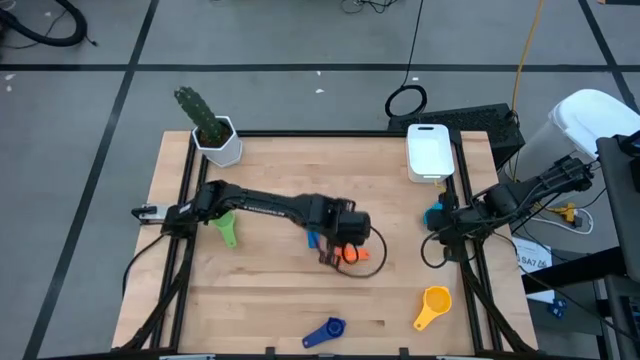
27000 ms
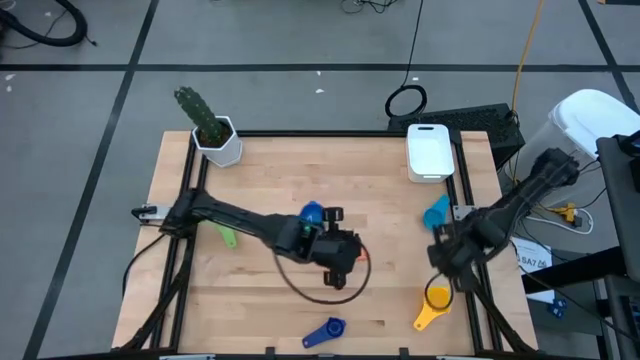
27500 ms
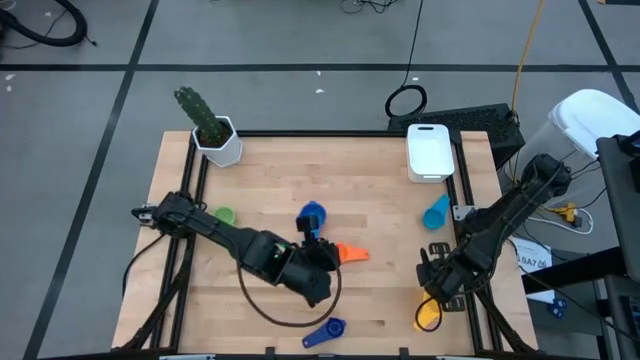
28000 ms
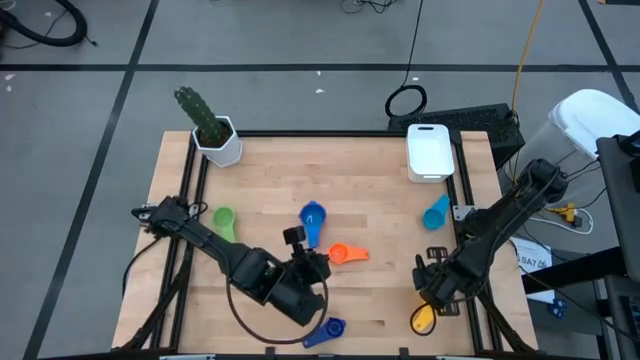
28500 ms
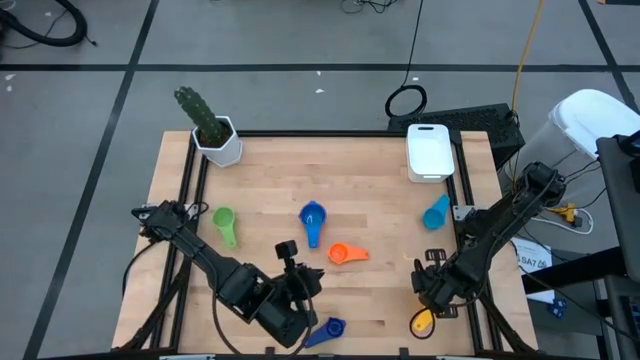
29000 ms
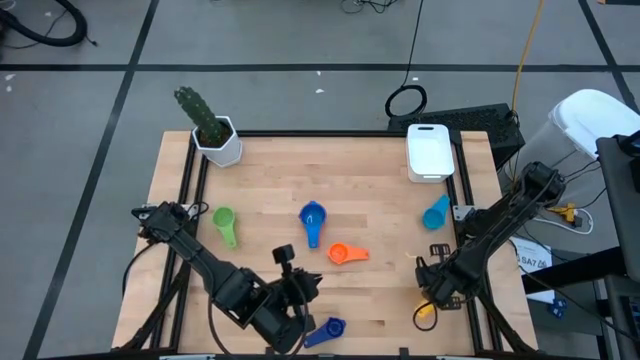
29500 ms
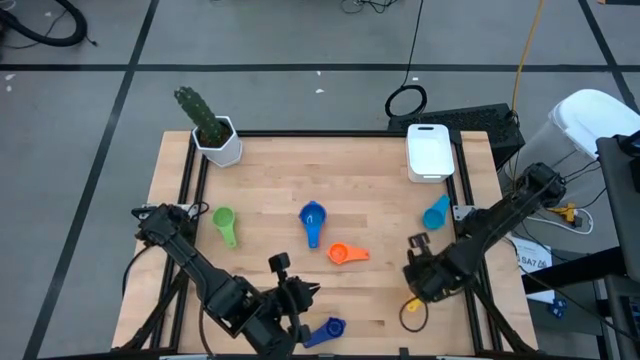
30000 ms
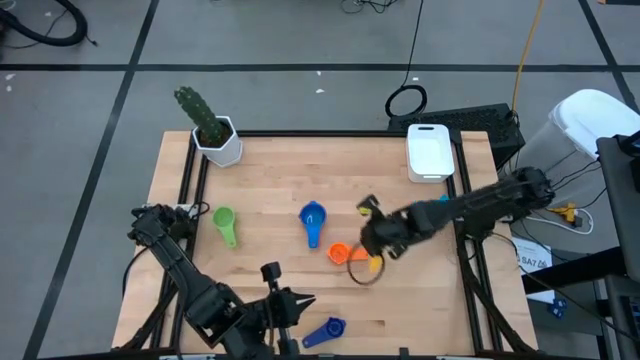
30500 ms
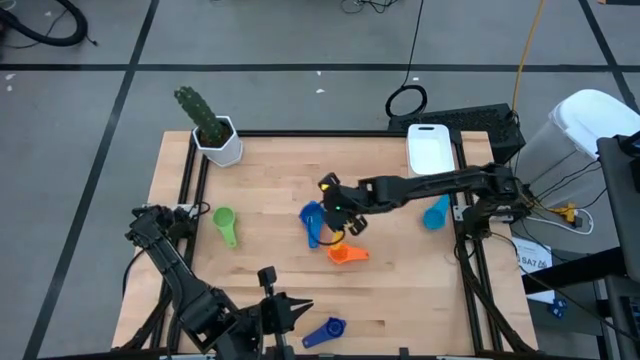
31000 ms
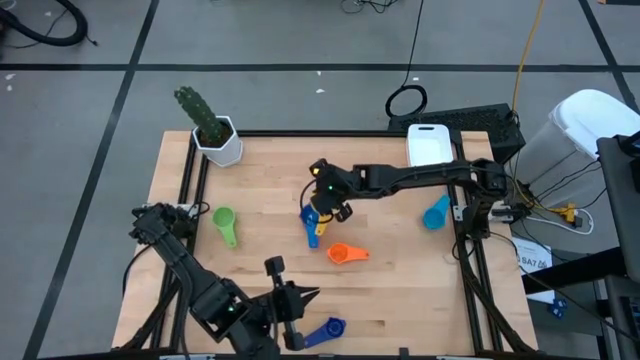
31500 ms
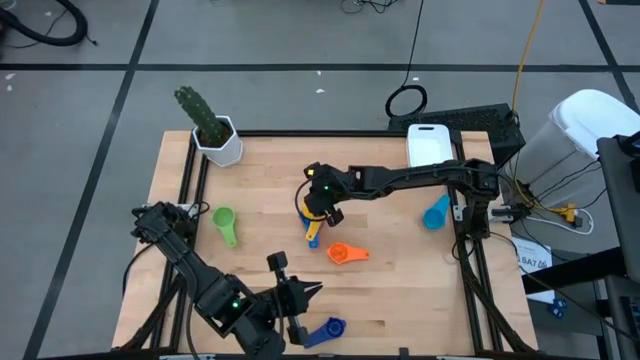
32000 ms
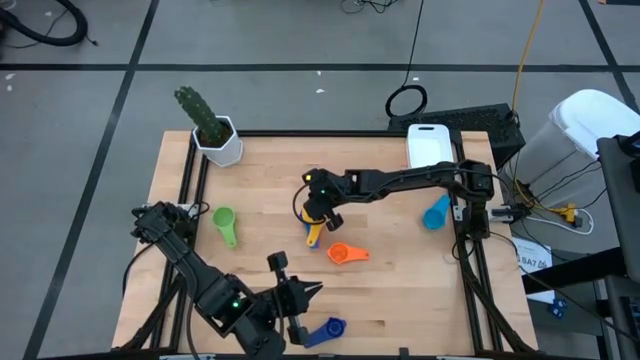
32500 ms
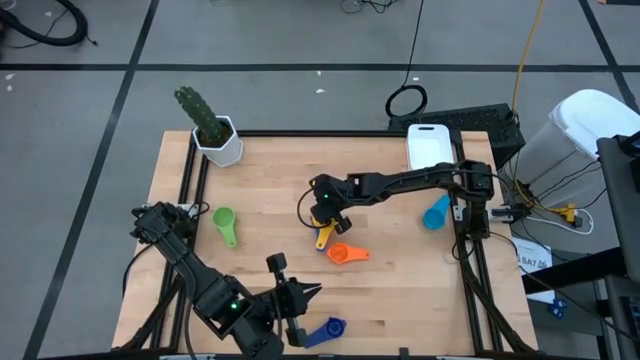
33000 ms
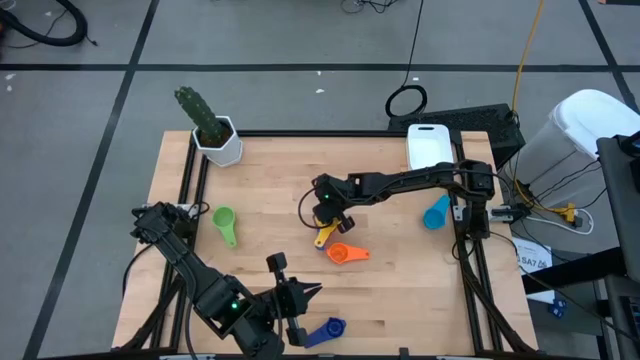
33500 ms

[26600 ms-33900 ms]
Task: Nest measuring cups in basket
Stack the yellow measuring cup on top of the blue measuring cup

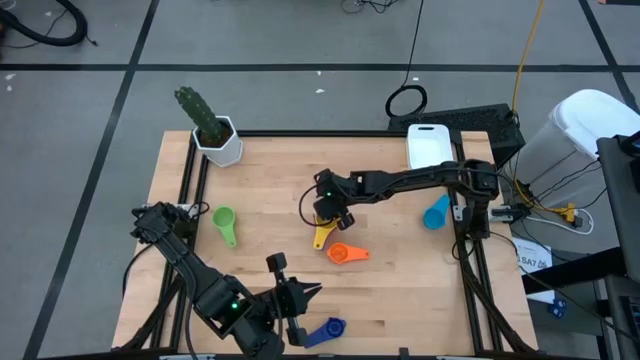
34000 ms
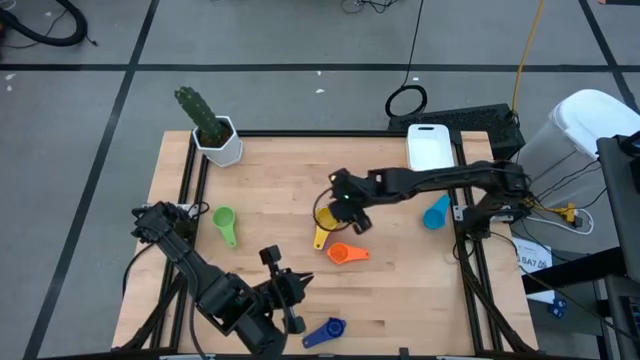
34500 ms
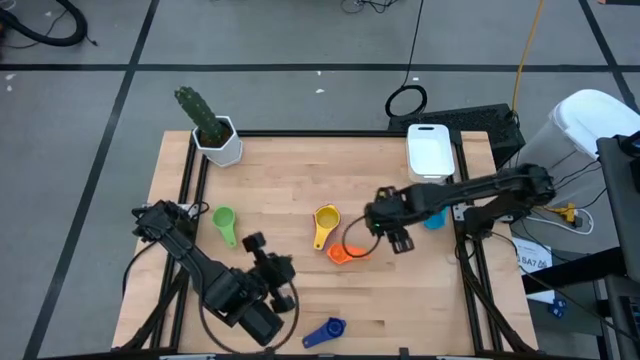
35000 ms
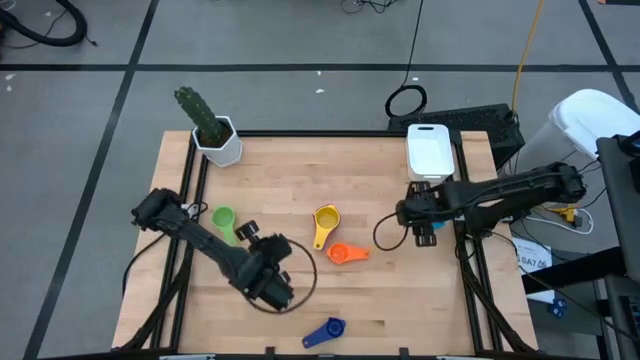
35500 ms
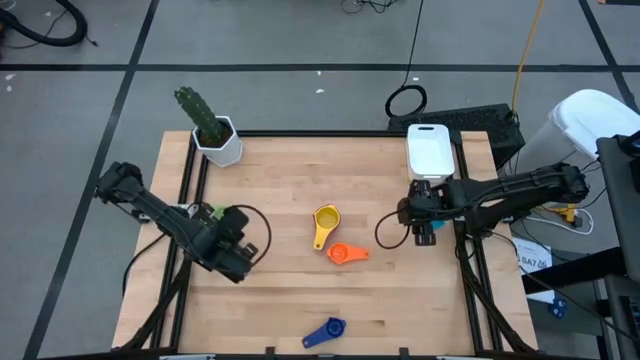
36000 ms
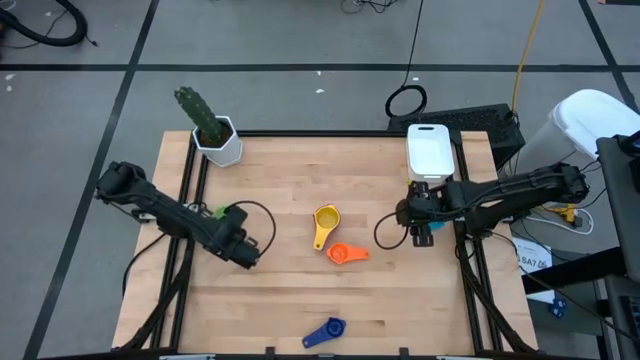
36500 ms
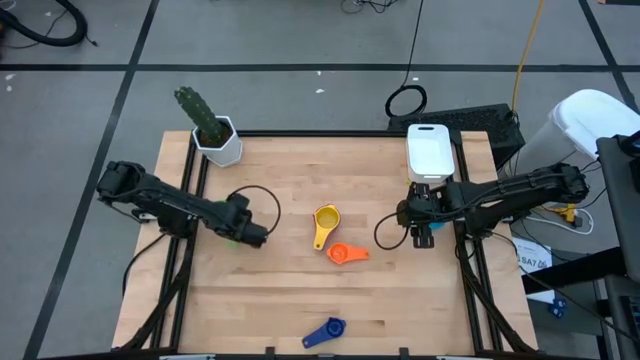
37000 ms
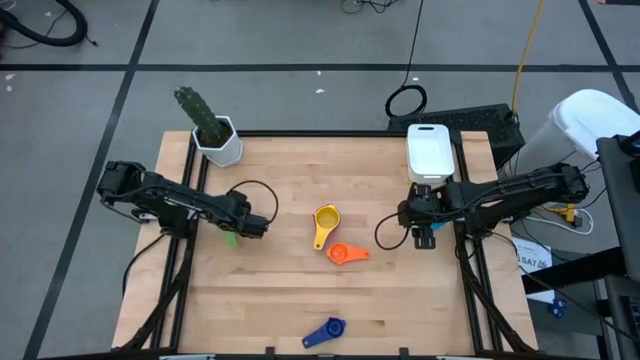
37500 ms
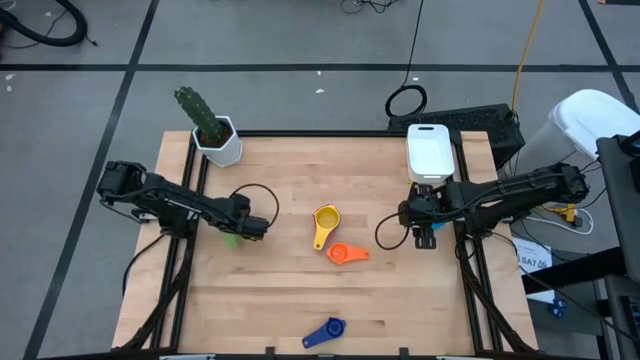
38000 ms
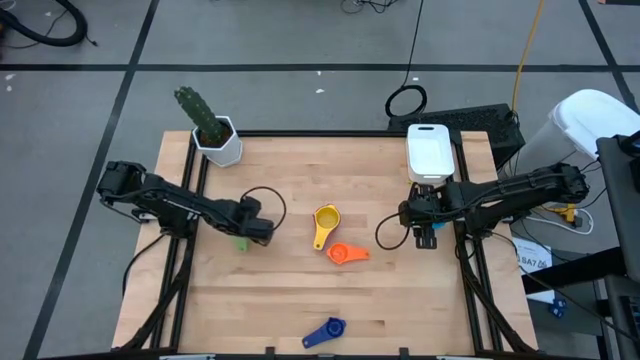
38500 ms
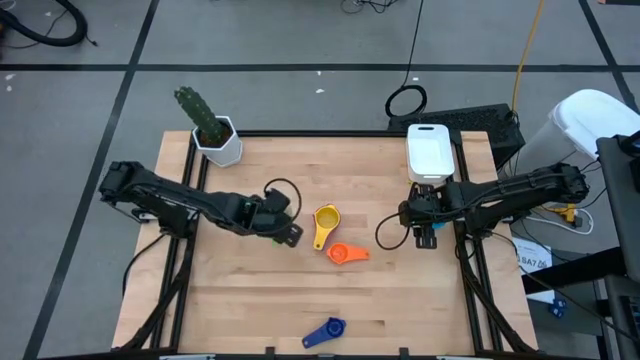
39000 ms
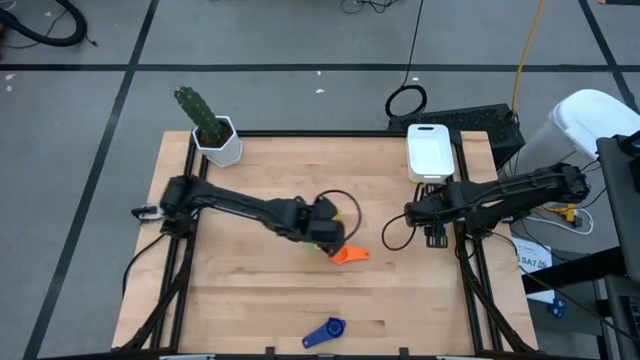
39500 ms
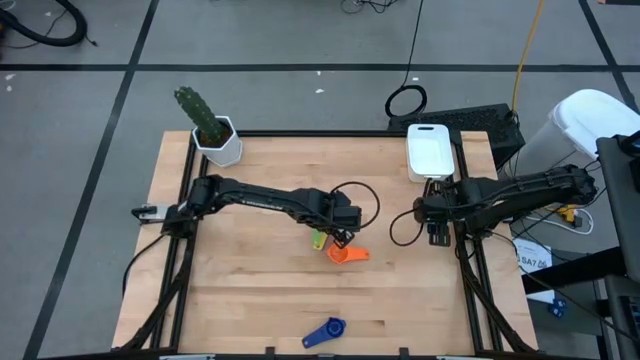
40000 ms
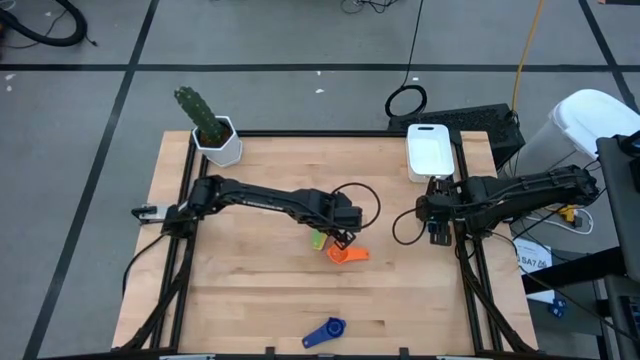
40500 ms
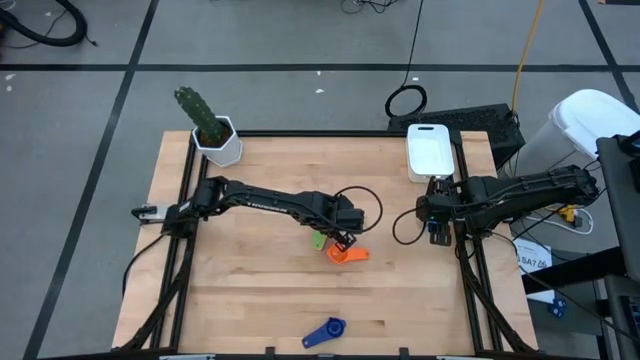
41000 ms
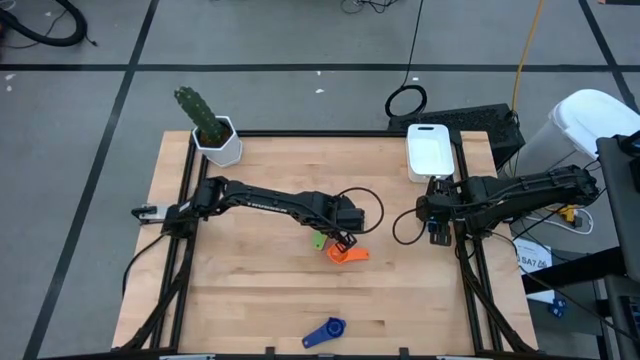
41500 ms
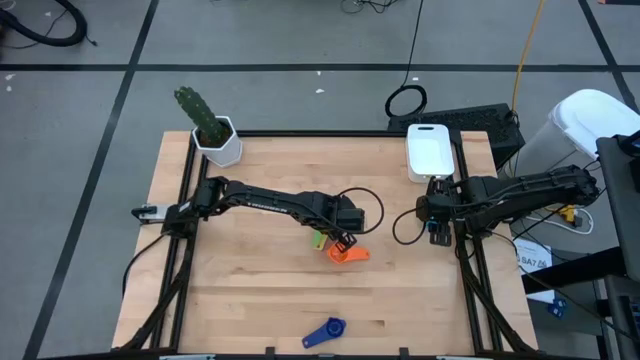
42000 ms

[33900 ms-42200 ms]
Stack the green measuring cup on top of the yellow measuring cup

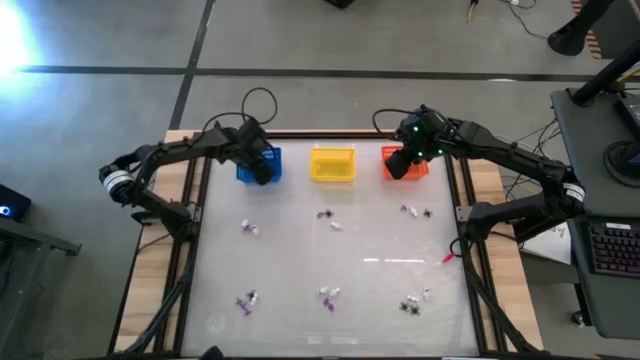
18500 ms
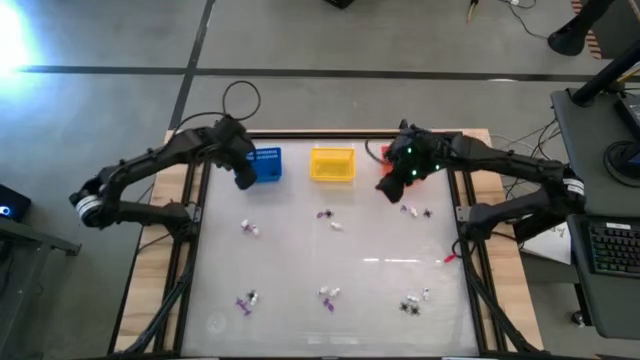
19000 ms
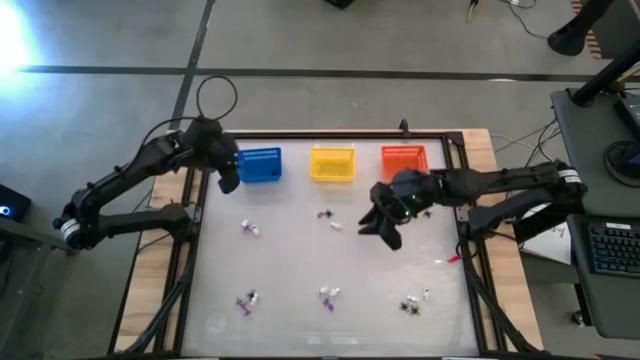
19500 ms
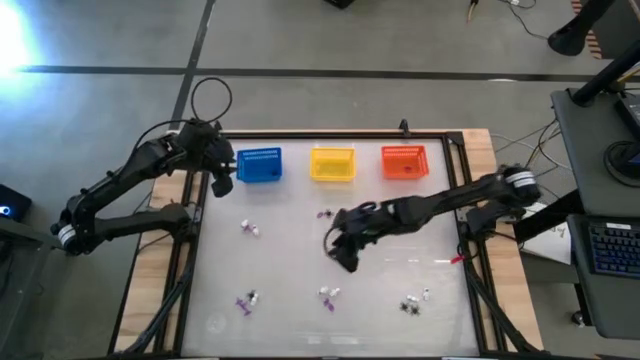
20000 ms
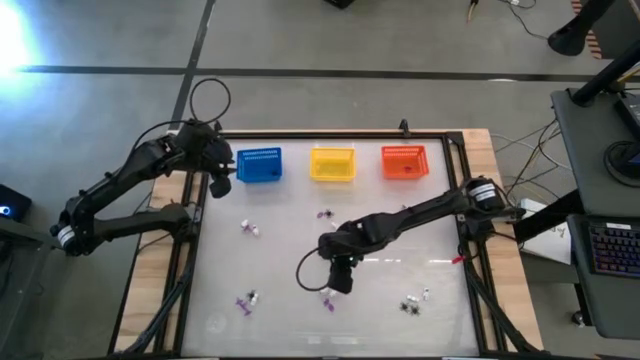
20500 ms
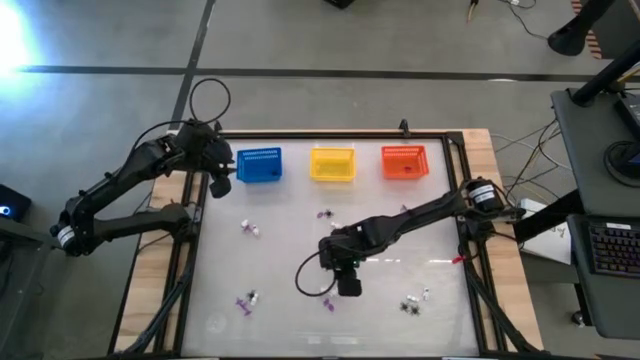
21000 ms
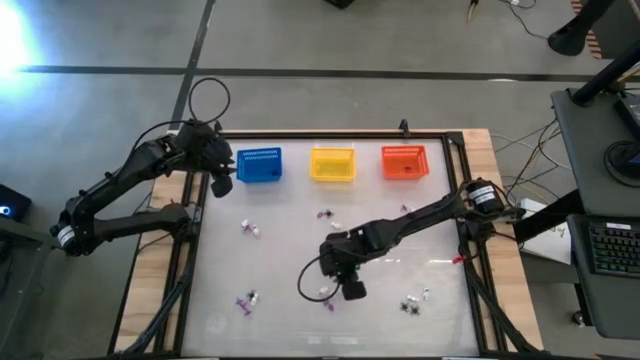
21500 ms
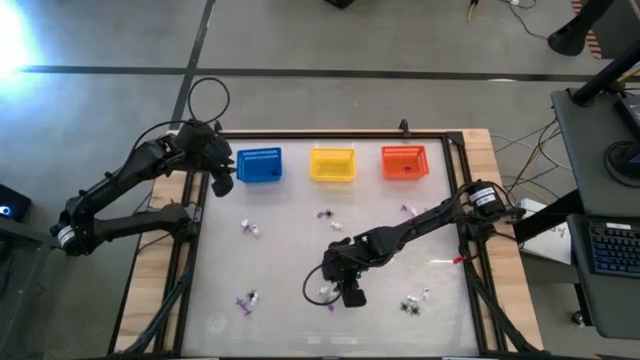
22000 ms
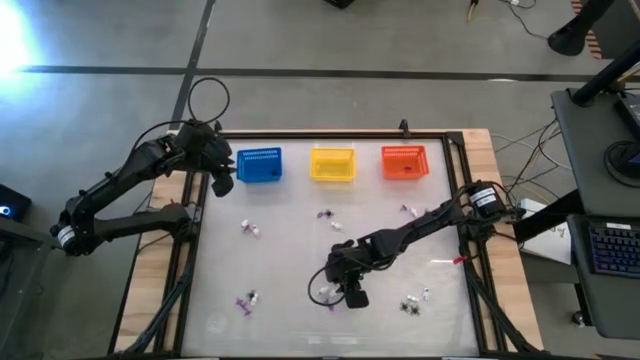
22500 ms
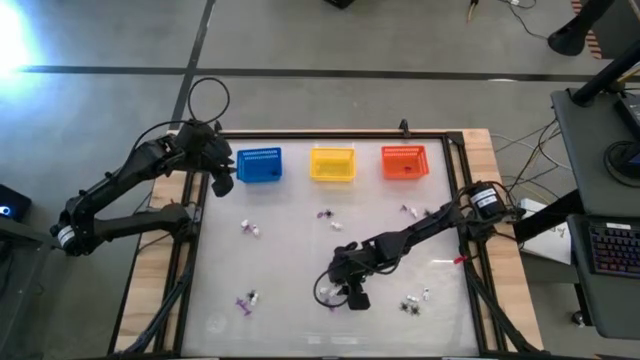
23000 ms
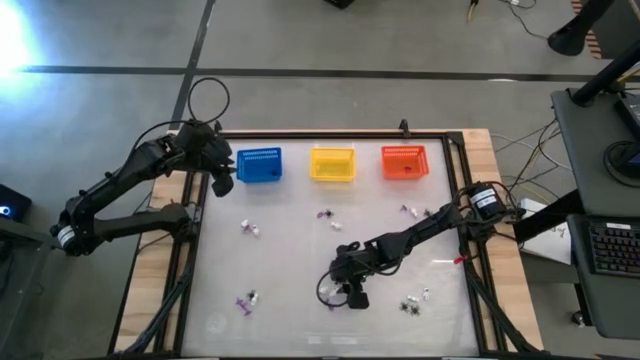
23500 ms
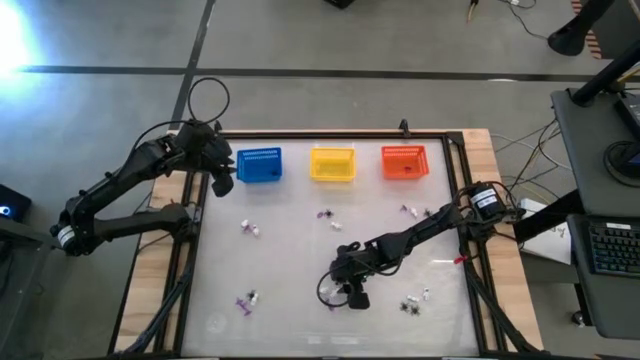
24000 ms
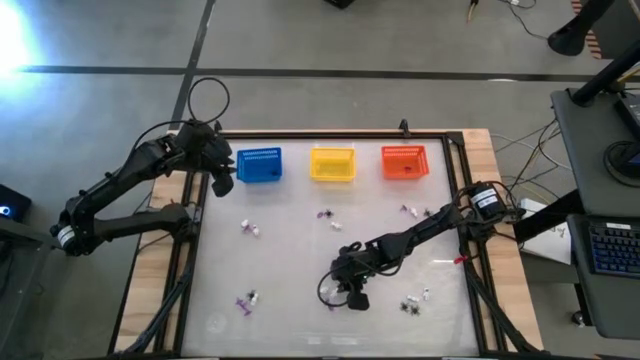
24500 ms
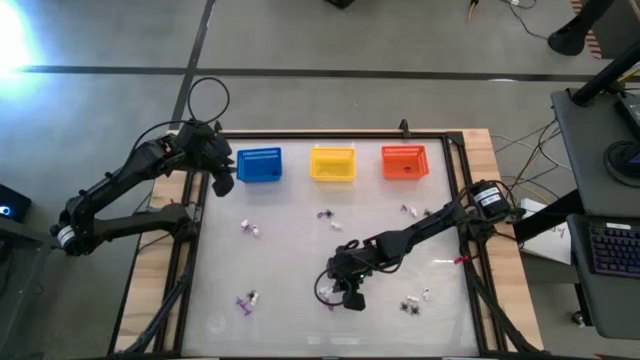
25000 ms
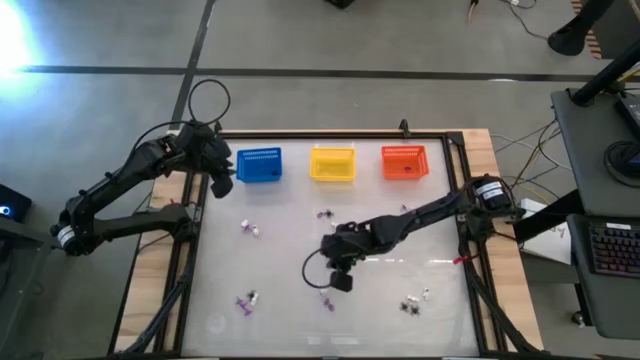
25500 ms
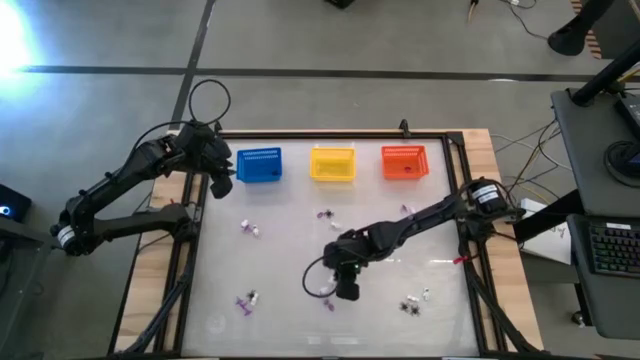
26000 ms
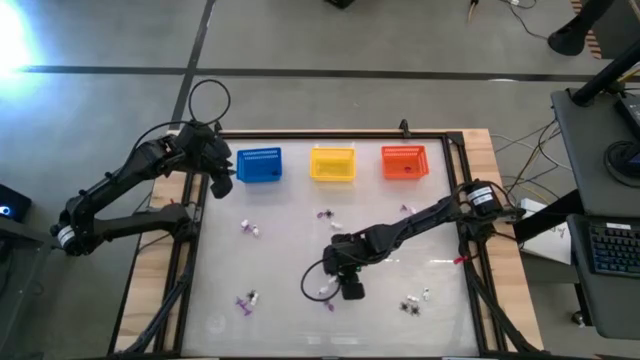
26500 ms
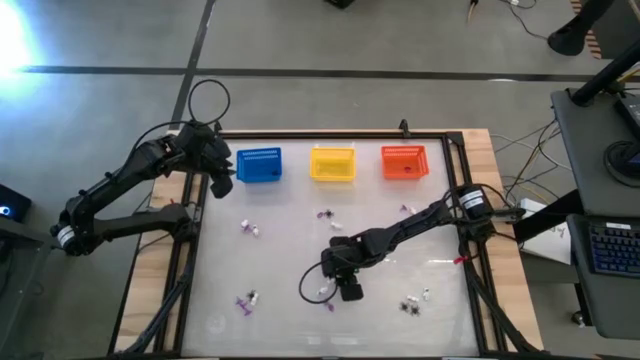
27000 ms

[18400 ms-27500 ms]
Task: Sort Halloween decoration
Put the white skeleton toy into the yellow bin
